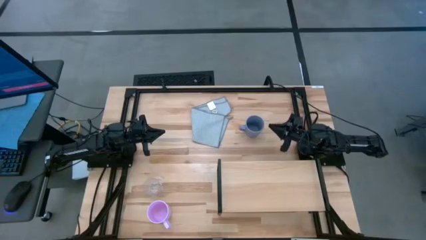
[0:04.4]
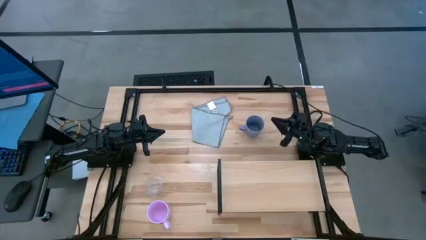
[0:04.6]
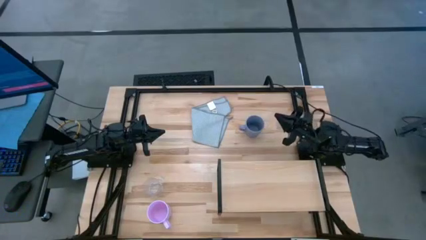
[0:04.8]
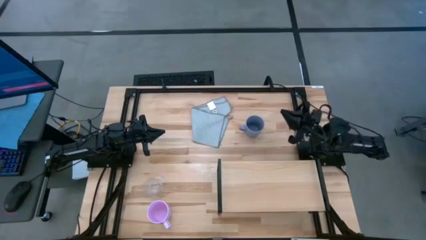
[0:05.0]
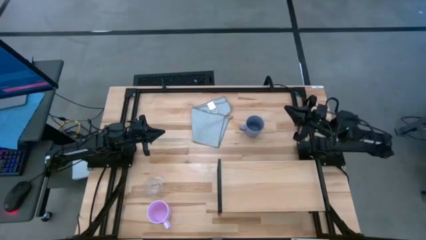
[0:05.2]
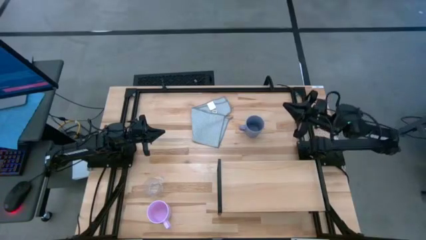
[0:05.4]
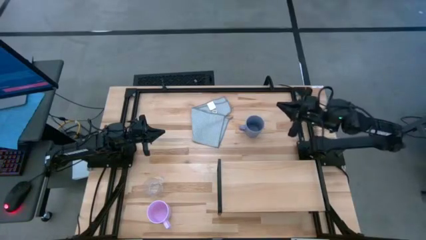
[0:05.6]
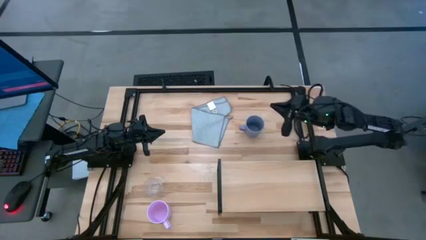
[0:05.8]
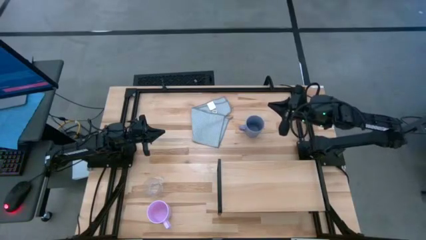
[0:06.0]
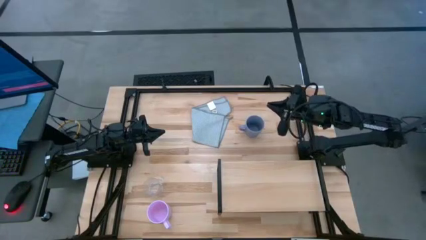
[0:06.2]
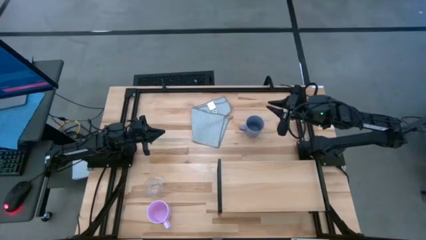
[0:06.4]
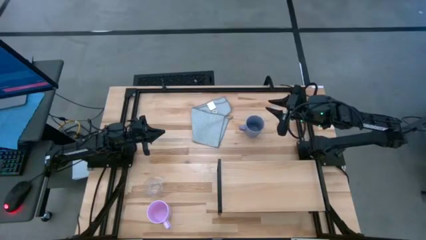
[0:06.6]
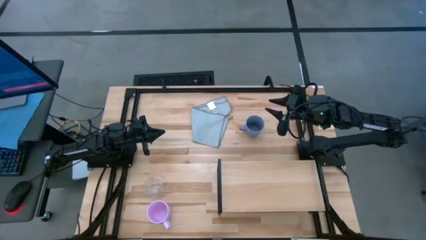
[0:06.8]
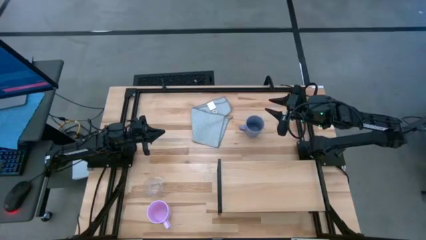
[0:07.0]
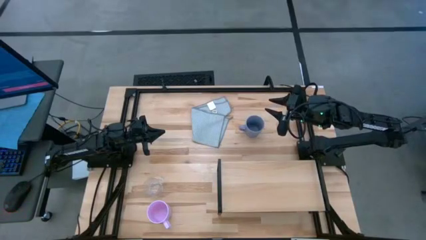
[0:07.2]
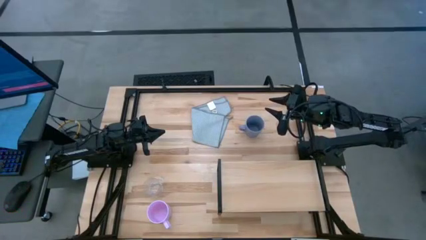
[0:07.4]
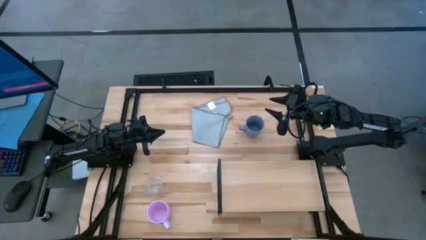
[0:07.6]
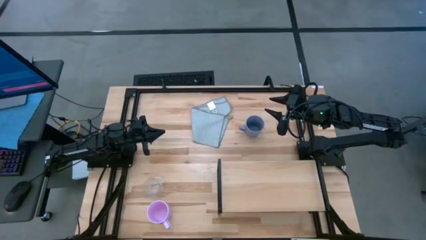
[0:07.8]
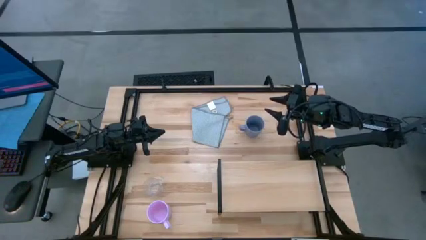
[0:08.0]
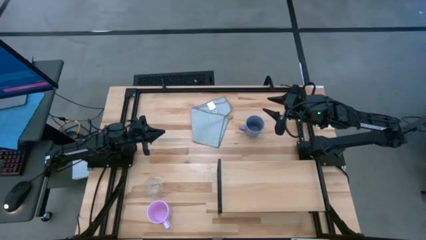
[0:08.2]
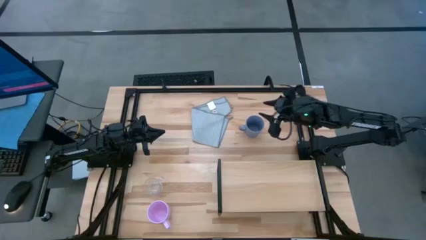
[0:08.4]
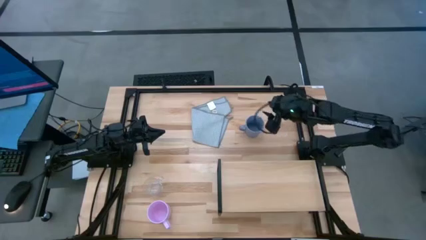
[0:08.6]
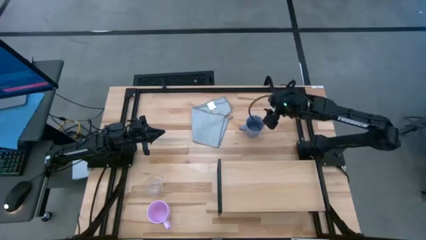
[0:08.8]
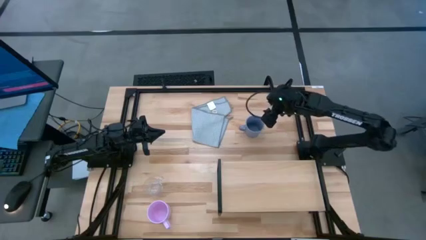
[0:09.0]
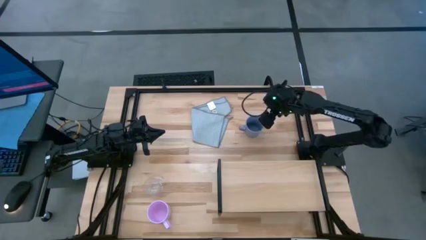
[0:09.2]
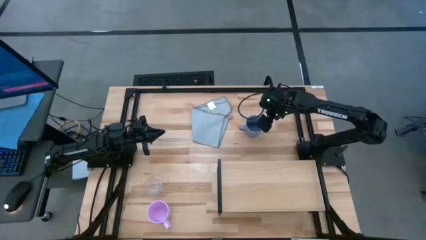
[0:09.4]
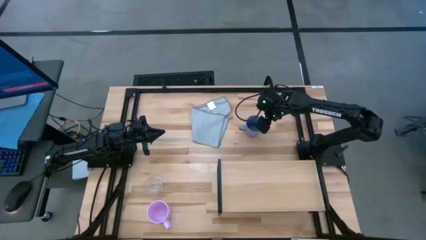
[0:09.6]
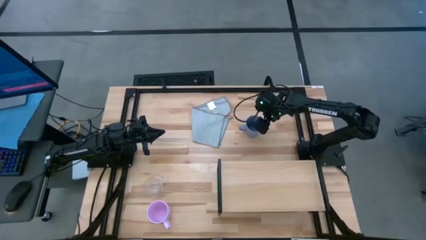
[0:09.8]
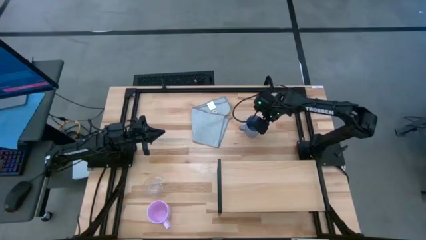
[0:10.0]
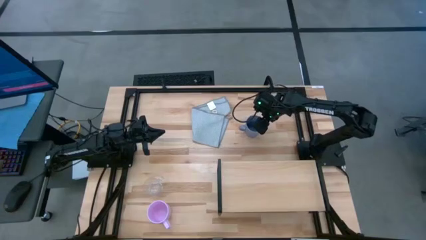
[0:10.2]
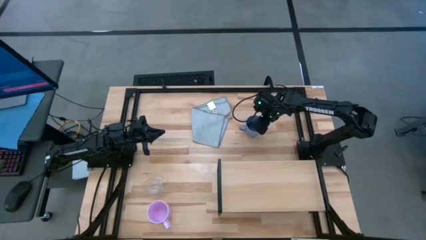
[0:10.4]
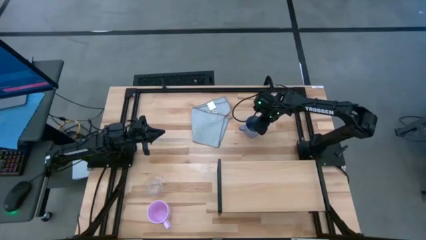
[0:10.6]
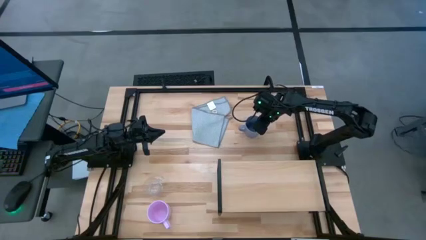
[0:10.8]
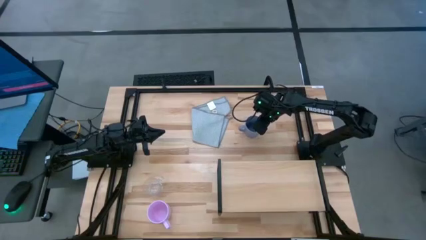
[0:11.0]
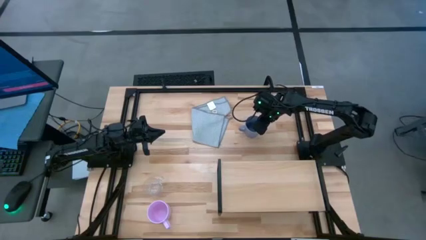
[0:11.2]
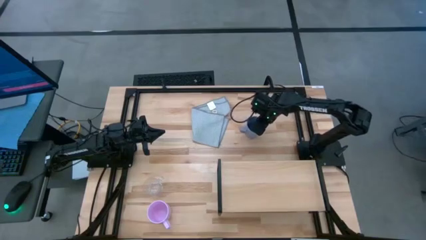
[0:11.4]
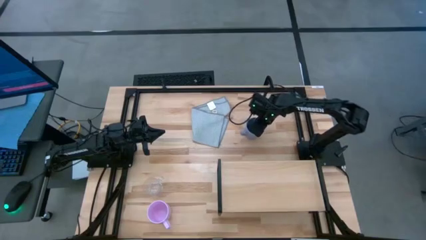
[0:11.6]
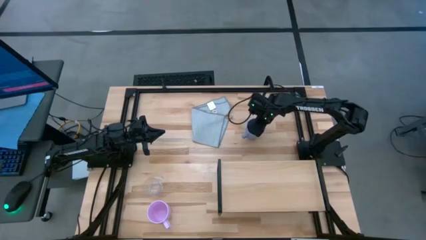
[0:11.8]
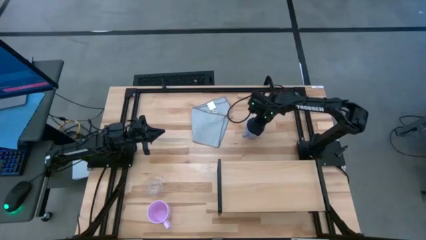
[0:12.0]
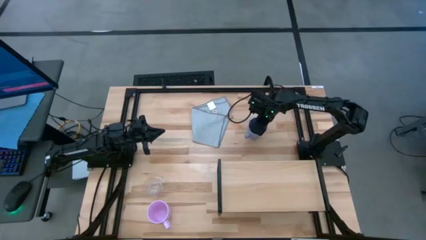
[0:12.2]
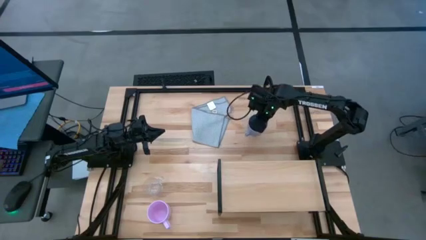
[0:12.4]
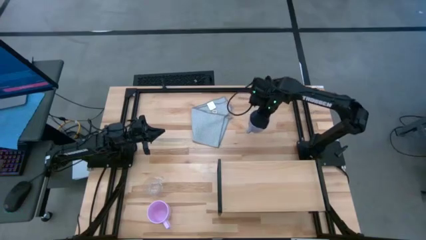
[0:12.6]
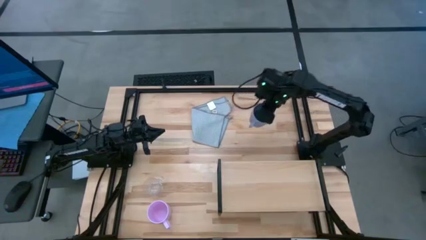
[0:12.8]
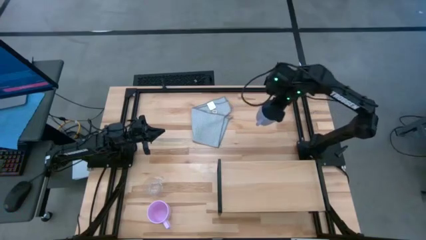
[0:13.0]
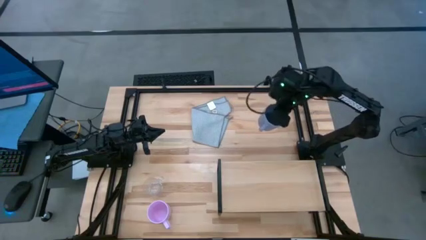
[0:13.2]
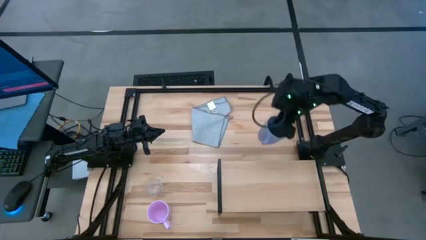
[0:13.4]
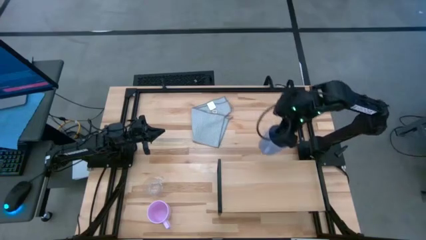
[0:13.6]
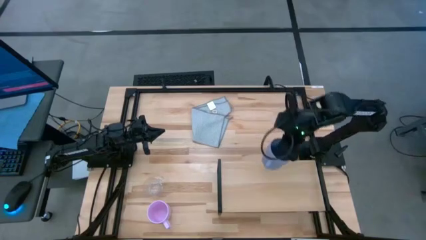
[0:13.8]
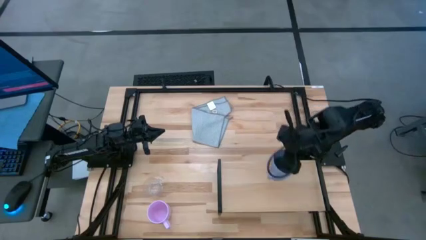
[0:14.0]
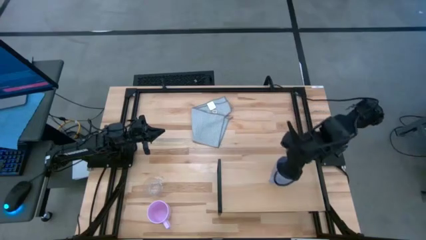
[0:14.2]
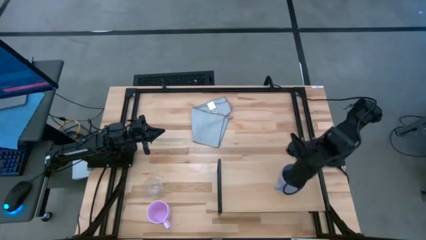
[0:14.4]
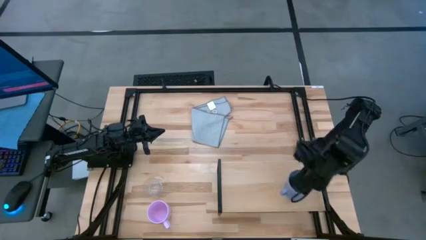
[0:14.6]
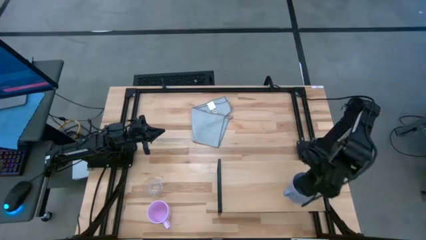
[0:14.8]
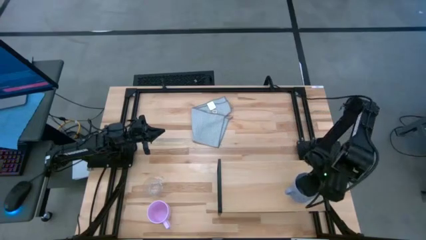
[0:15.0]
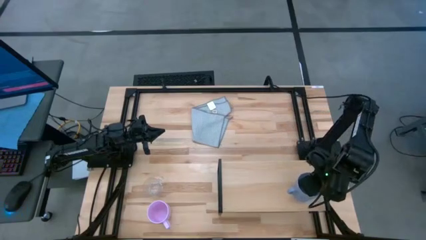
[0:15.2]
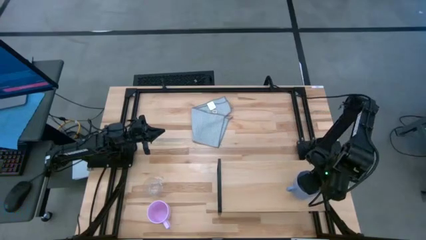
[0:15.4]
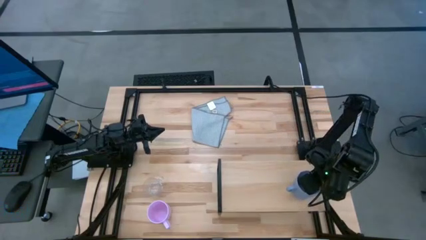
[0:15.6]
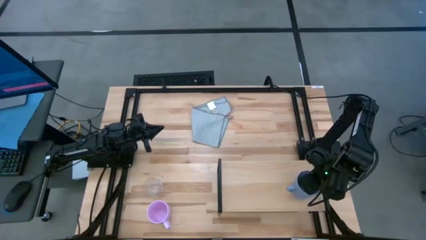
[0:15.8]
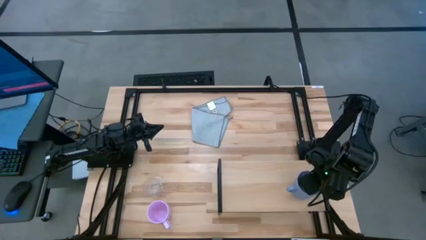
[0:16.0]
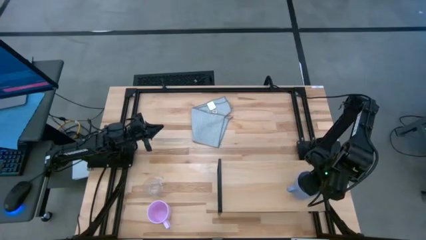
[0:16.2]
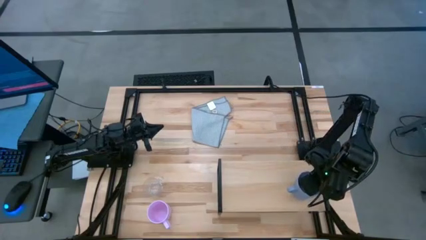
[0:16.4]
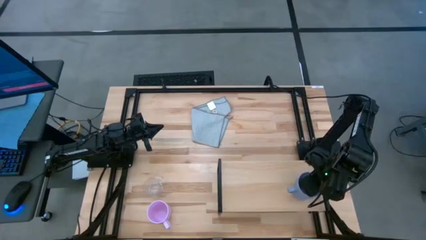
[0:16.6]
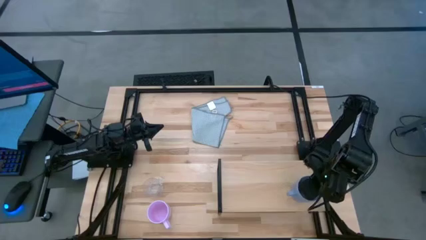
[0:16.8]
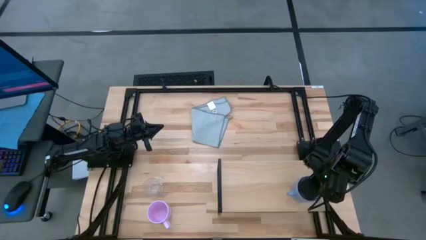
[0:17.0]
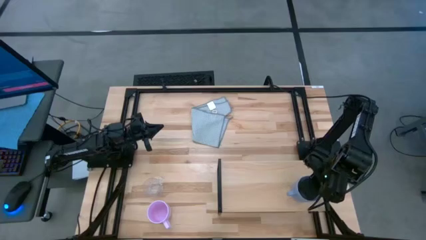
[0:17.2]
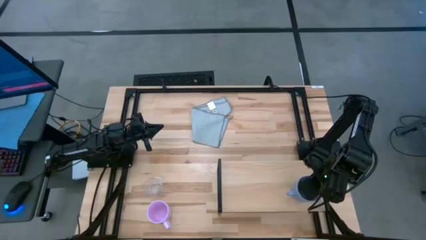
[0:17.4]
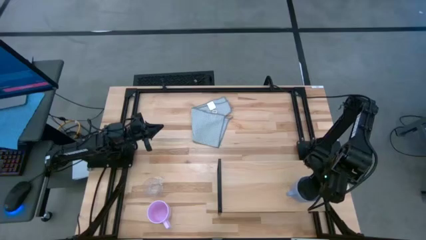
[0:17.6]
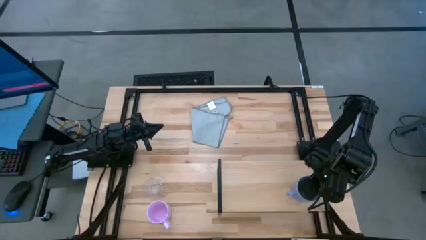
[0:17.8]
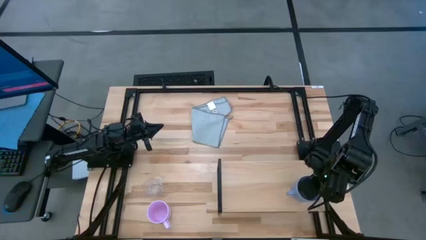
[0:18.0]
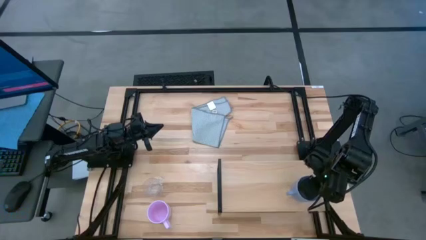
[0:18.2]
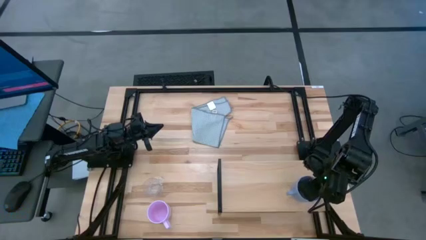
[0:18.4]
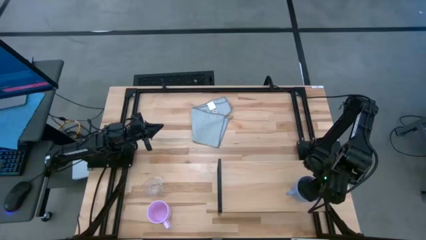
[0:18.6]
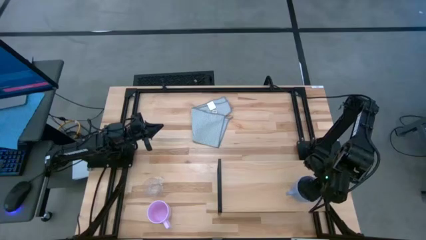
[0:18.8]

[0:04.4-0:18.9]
Task: Stack small to large cups/mugs on shelf
Put the blue mug on the shelf

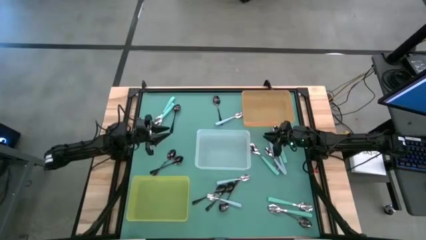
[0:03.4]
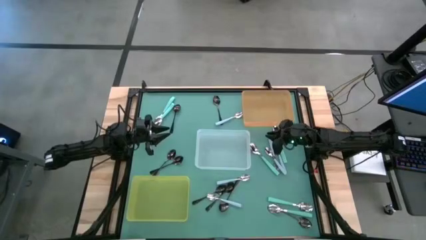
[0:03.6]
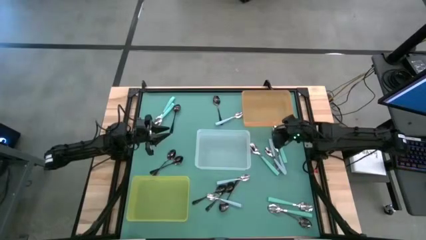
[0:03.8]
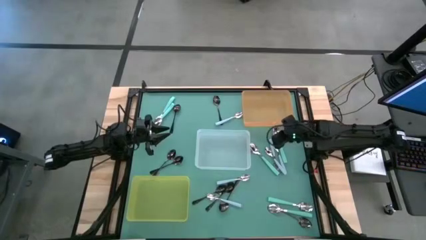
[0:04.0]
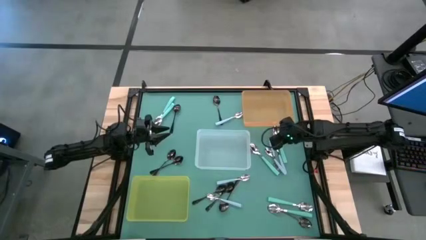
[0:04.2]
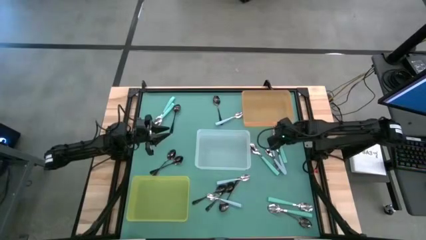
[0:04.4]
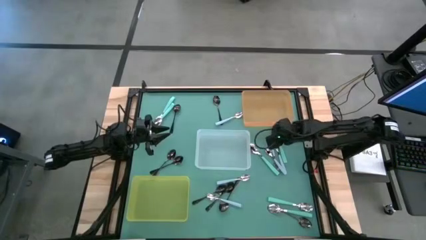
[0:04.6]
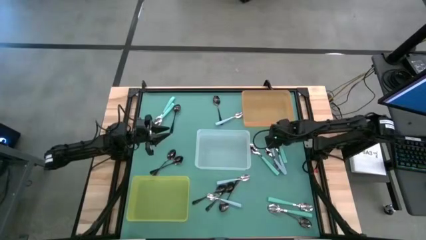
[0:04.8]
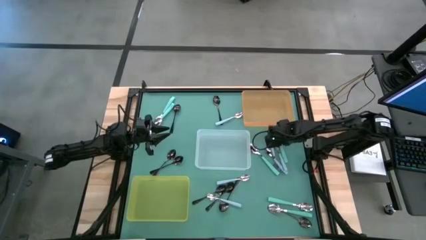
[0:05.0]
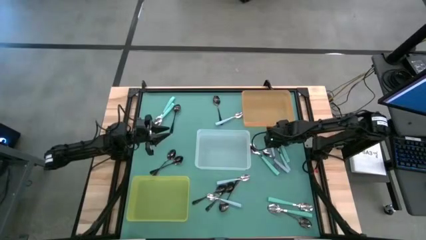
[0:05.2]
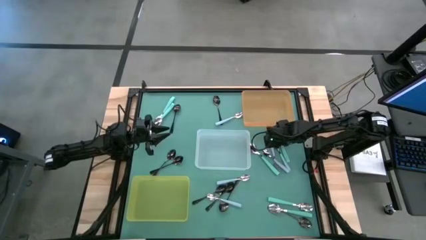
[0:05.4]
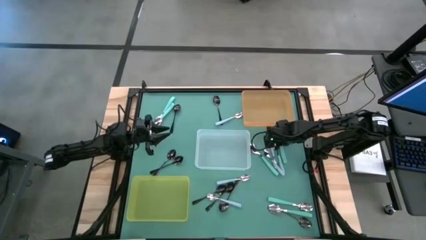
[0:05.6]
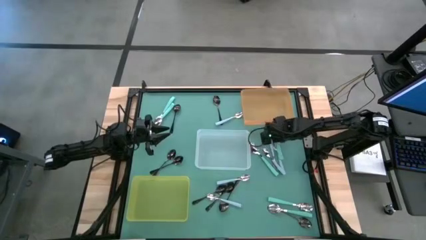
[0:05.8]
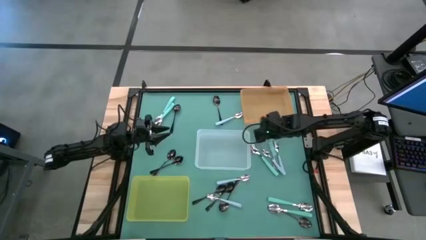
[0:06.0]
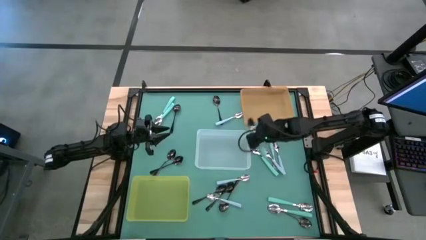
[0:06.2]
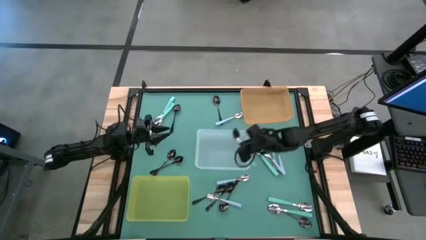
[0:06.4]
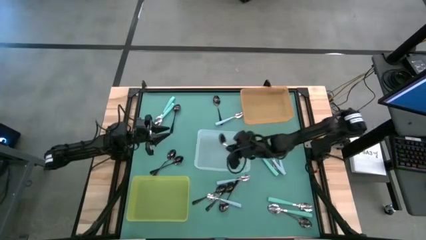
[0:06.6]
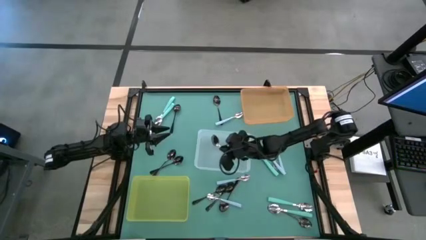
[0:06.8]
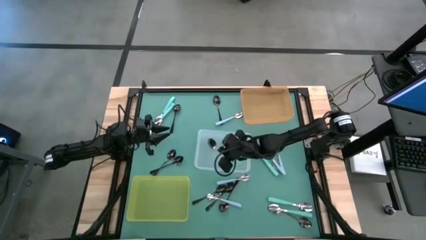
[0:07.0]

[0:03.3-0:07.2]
Task: Sort silverware by color (type)
Put the green spoon into the transparent bin
